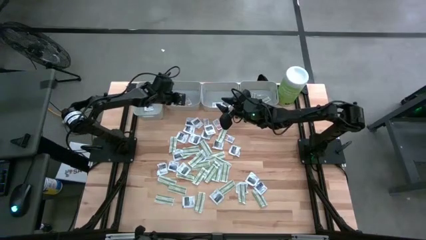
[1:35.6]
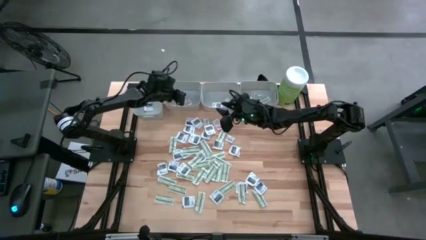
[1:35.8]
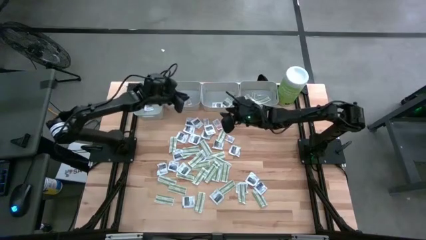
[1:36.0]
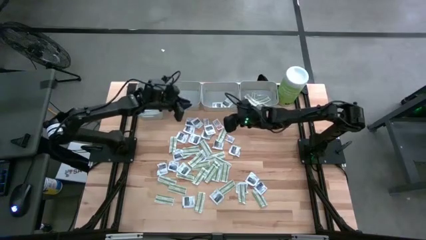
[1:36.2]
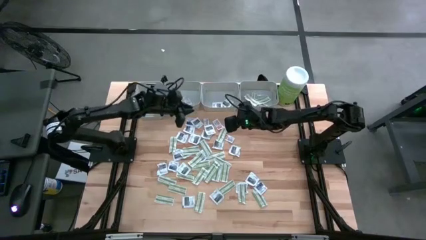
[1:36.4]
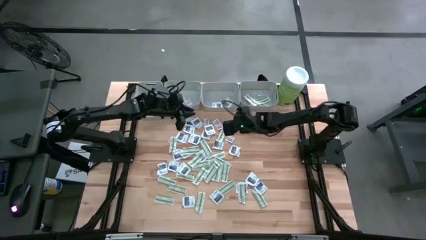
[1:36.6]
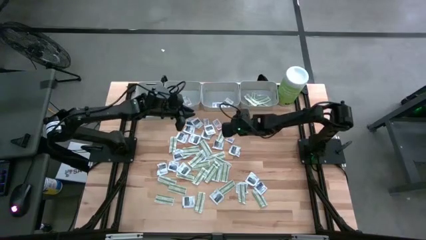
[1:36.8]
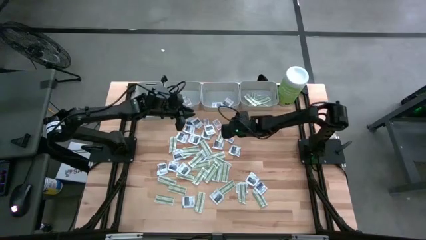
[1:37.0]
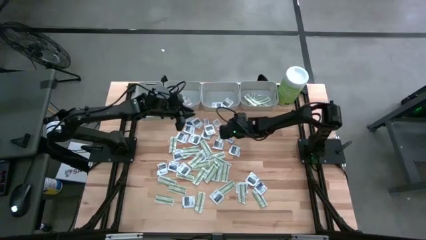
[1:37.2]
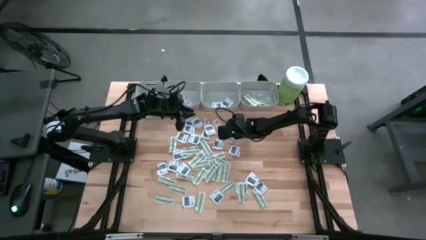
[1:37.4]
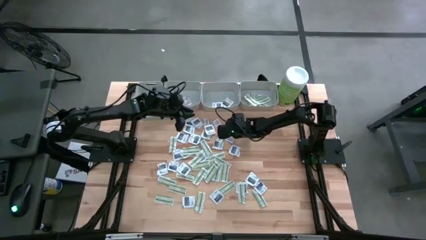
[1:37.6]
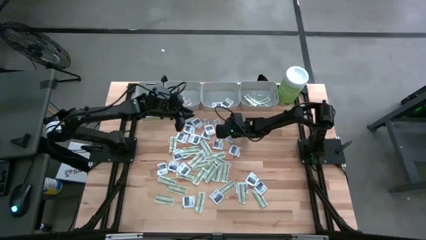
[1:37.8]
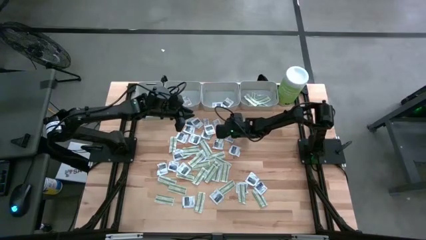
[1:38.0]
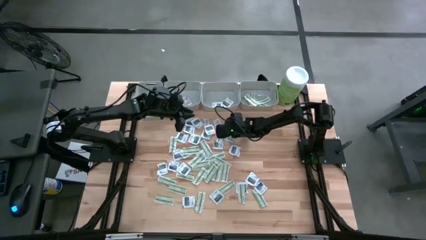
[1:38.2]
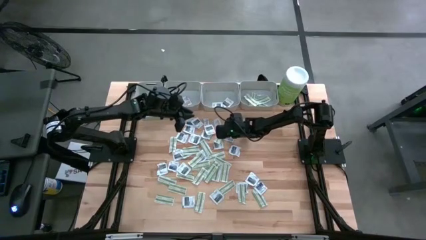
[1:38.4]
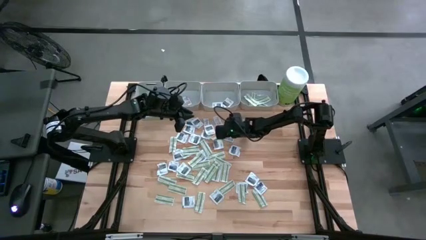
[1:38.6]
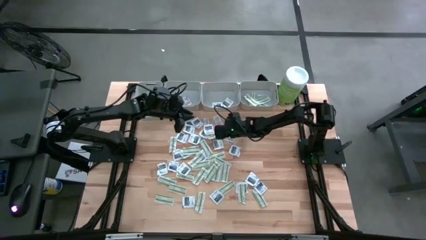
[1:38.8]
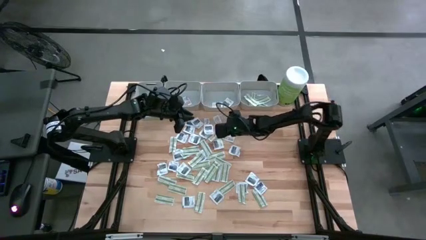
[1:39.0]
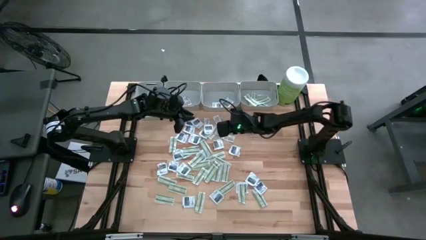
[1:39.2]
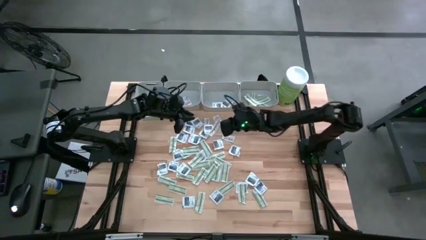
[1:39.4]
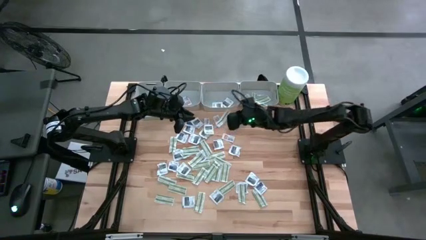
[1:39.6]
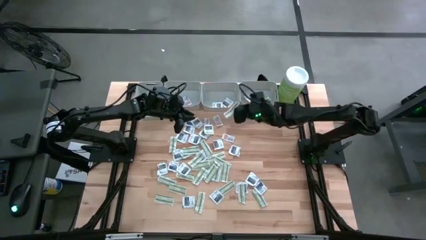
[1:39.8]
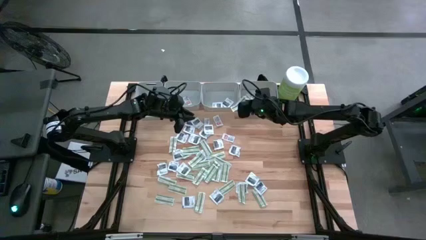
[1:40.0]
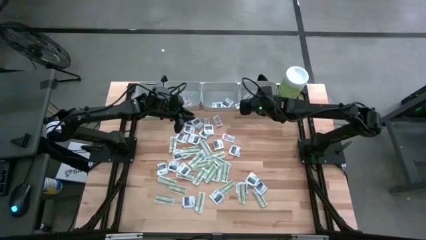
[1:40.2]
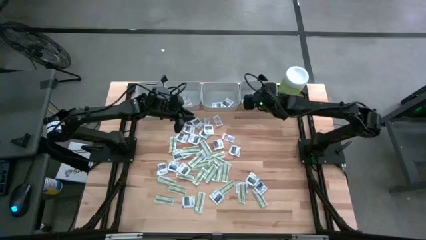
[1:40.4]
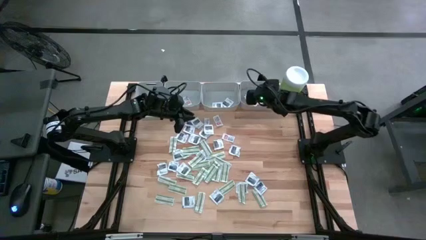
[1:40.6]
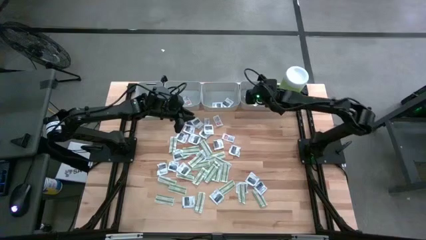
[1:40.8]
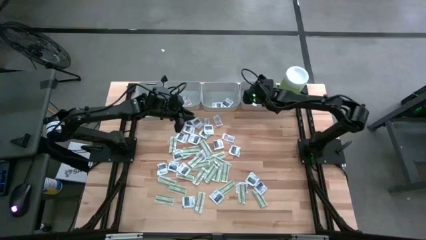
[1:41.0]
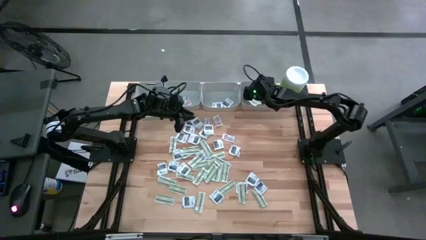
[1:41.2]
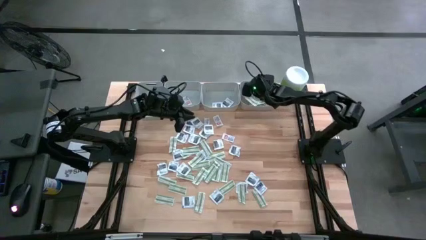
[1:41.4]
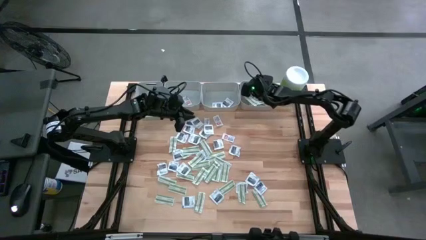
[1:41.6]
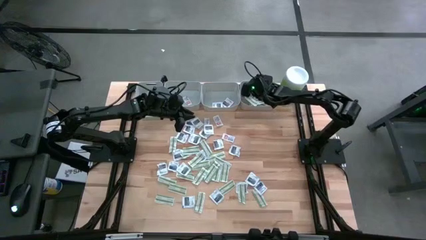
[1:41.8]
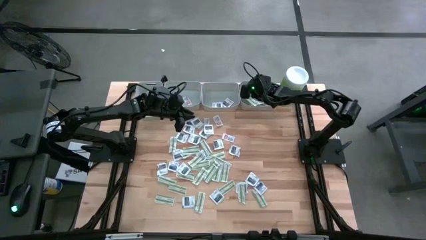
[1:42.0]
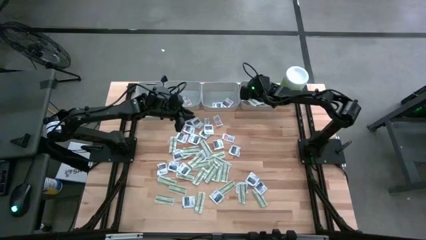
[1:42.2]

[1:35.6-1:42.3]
Task: Pick & Place First Aid Supplies
Put the green bandage into the right gray bin

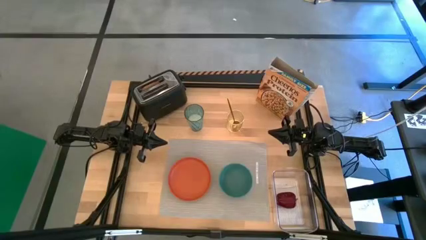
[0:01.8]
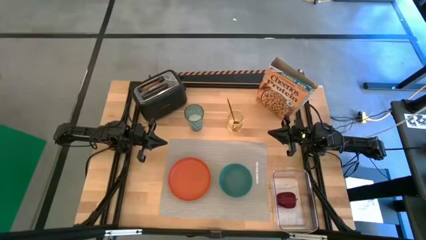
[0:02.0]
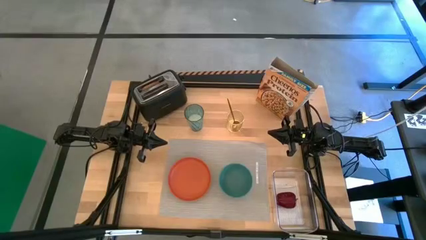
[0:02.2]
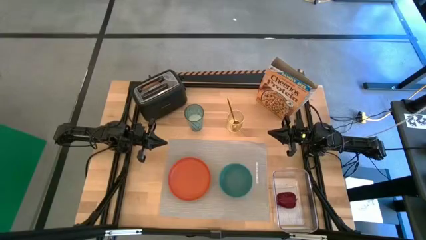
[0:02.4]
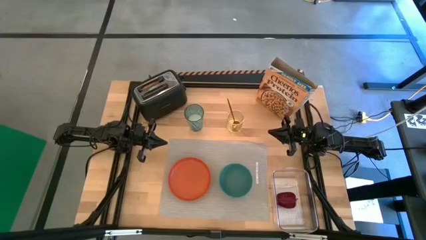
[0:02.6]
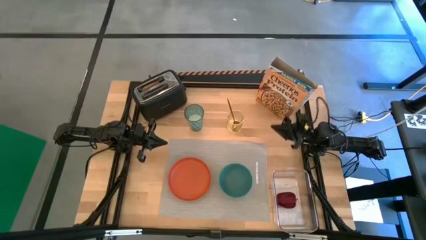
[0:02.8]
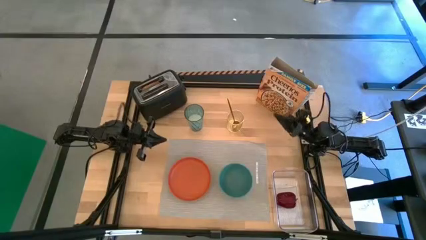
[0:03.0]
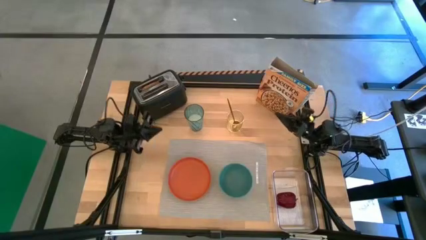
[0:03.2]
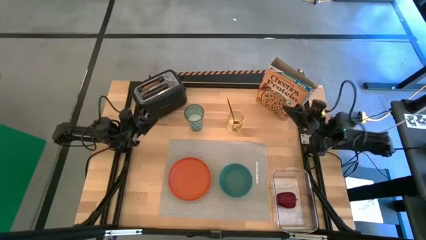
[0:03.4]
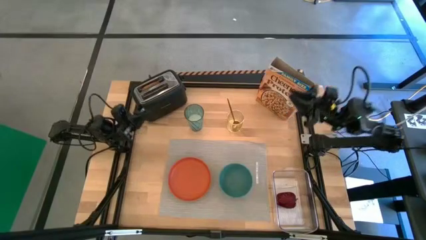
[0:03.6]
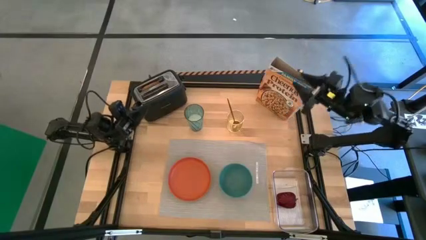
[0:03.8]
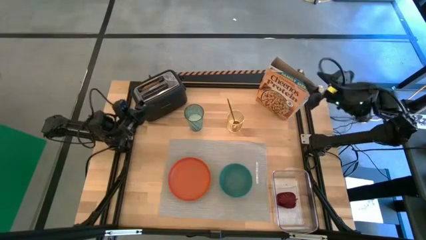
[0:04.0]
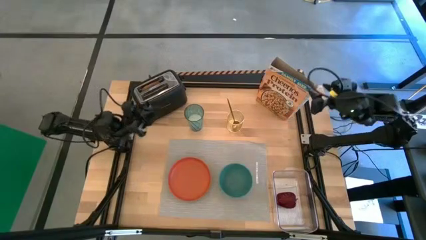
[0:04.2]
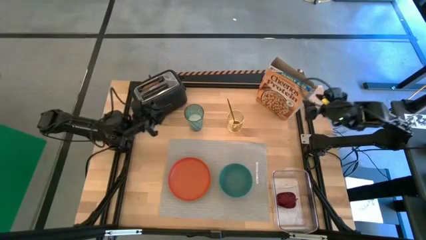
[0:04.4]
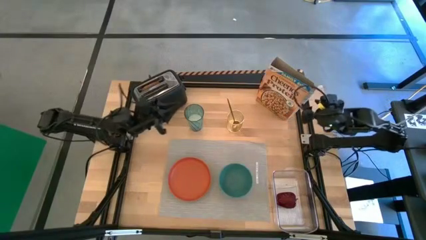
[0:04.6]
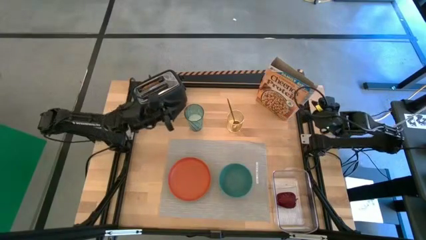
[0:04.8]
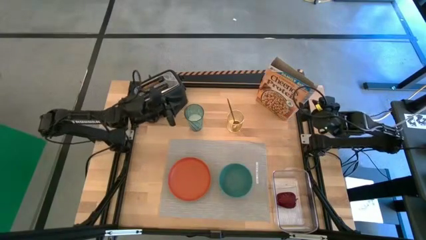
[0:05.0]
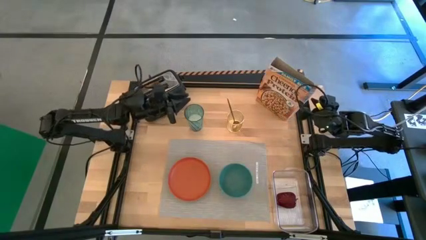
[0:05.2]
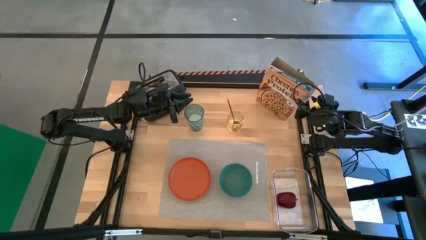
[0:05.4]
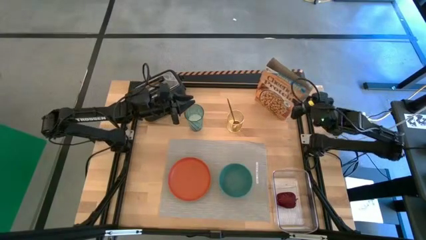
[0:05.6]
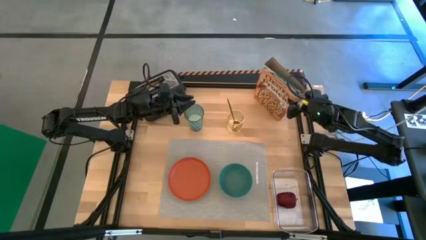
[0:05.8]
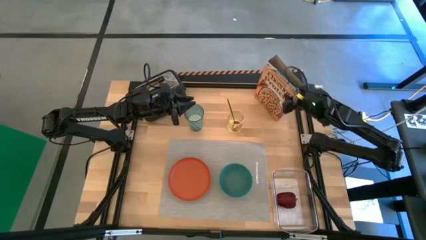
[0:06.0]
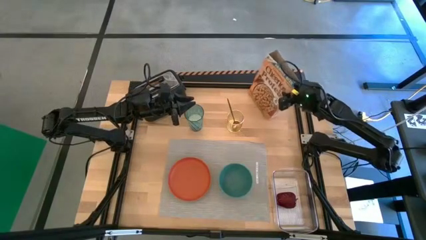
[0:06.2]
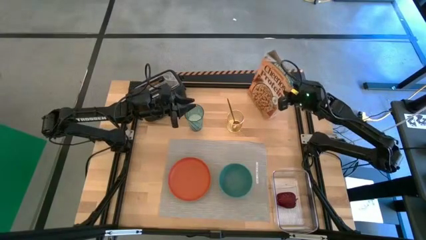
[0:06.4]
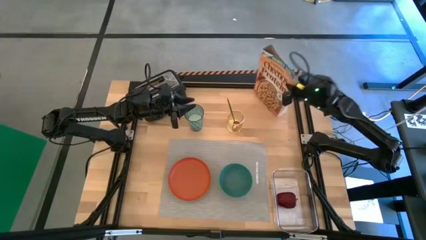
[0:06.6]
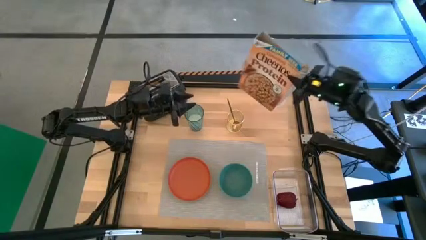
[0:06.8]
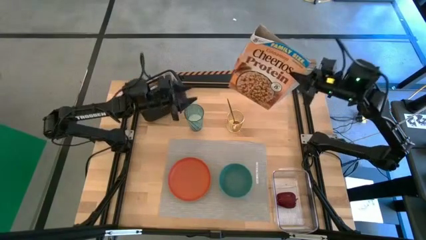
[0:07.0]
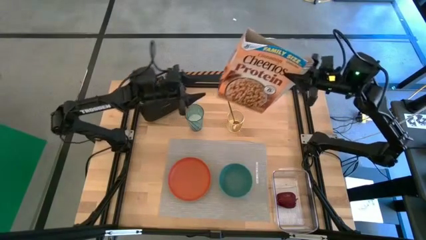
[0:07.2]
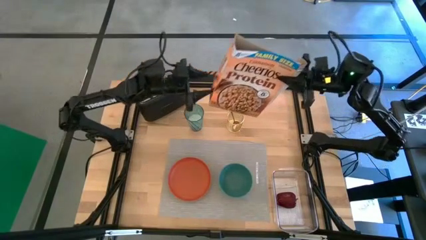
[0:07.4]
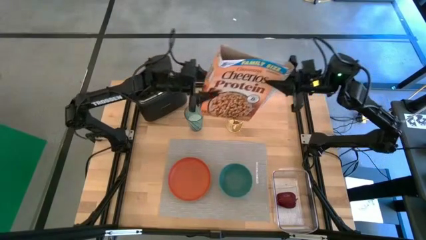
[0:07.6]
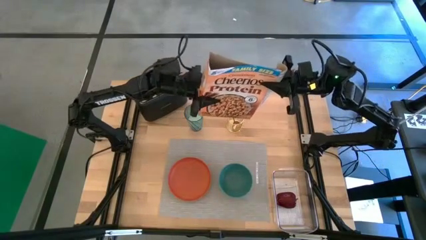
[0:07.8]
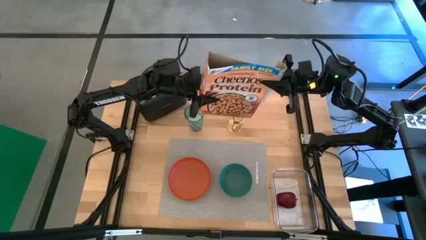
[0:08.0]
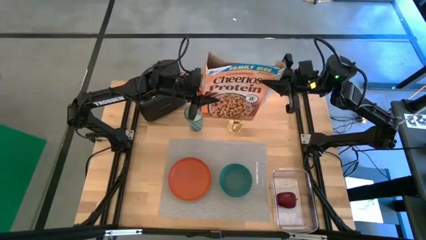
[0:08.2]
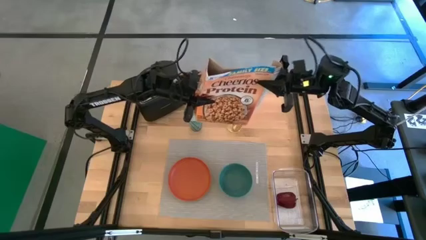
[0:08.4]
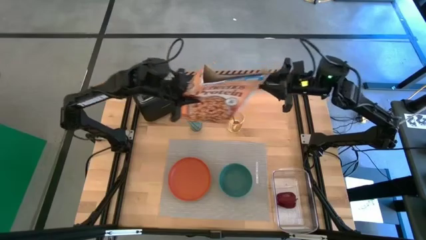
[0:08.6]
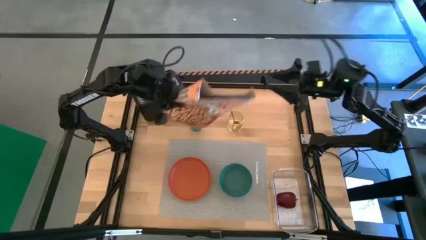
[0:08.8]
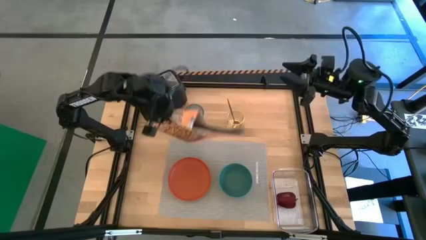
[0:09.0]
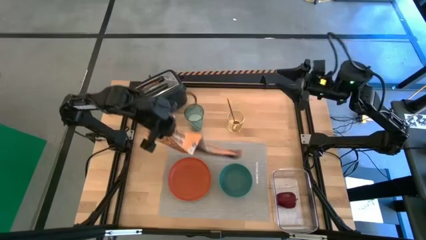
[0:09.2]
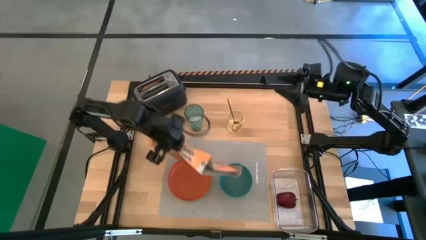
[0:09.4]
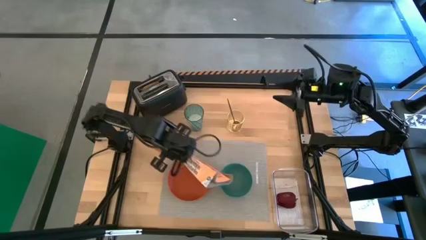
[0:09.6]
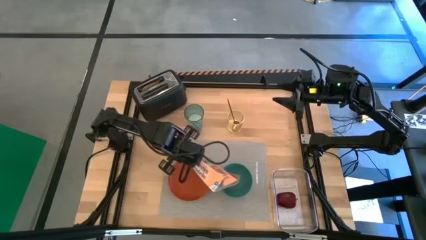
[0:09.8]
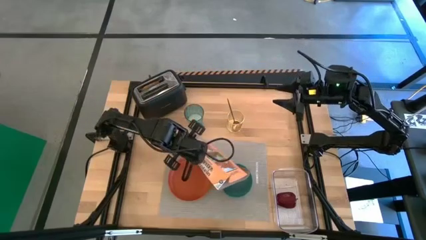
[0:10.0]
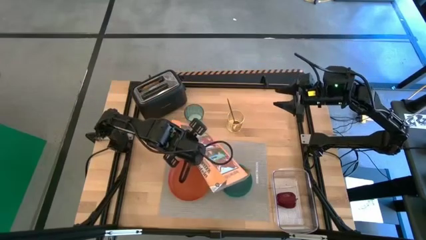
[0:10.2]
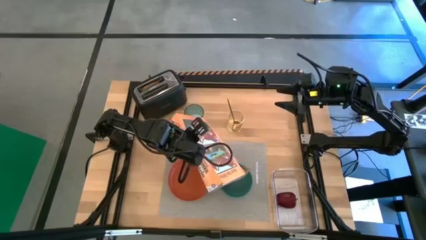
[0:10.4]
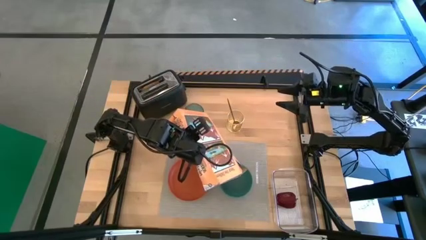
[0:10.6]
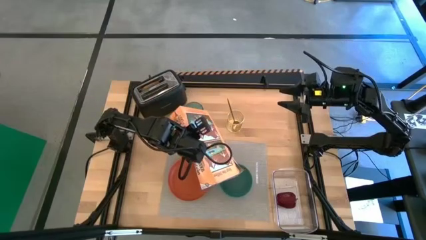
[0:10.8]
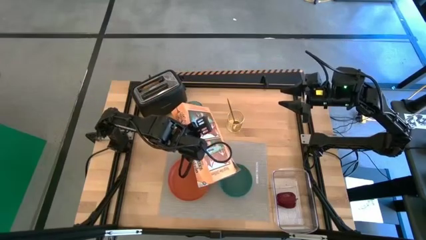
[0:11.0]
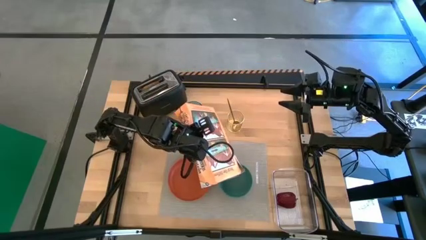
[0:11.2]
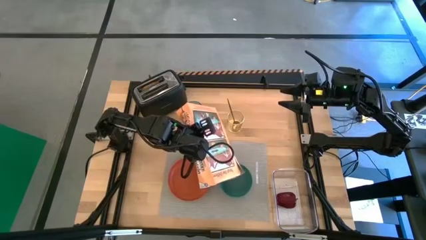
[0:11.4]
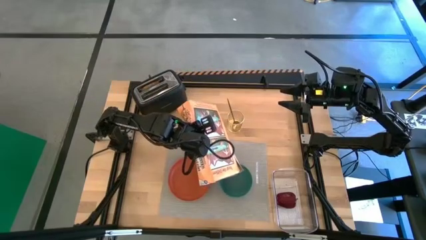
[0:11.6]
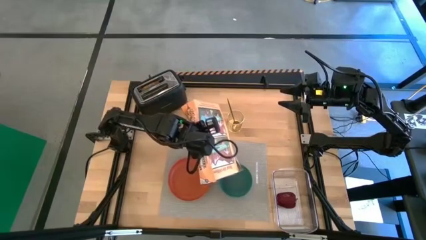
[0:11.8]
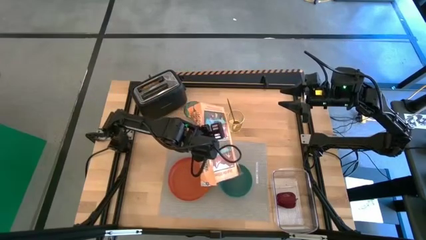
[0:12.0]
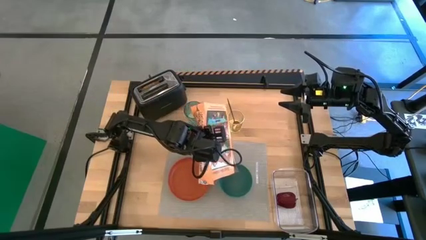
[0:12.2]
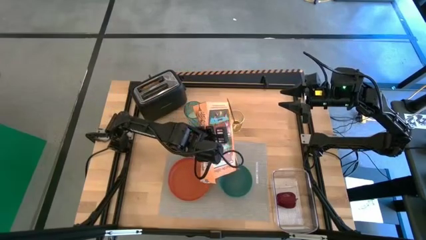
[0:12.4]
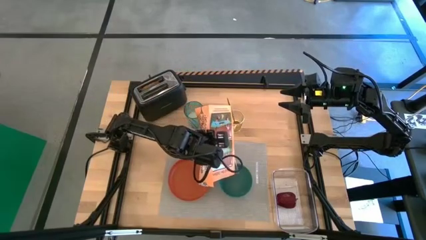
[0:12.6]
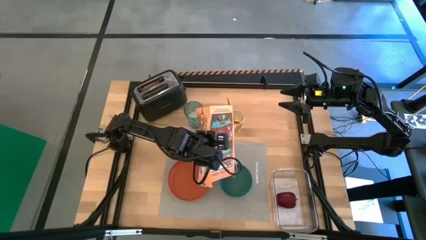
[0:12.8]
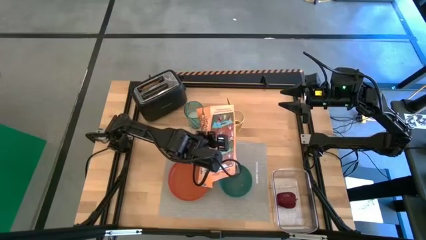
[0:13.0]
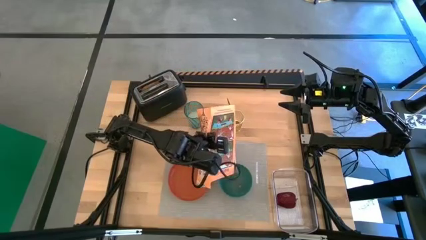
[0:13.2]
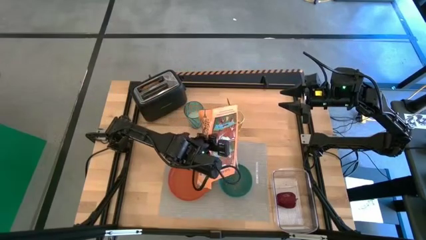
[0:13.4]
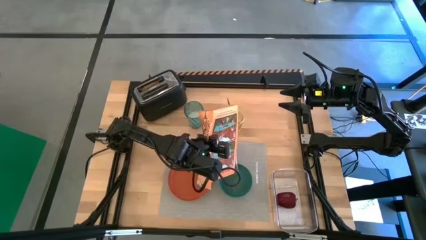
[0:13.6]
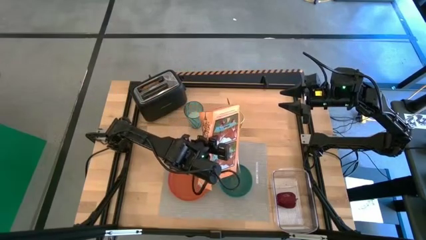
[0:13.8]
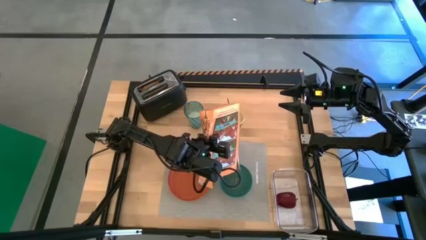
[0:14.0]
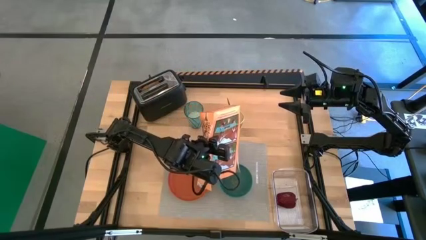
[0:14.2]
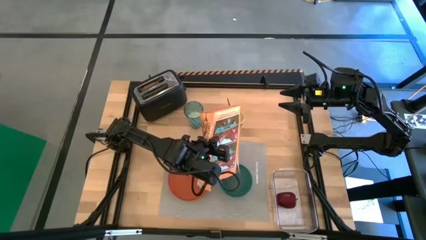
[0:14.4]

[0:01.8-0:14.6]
Task: Arrange a breakfast setting
Pour the yellow cereal in the green bowl
